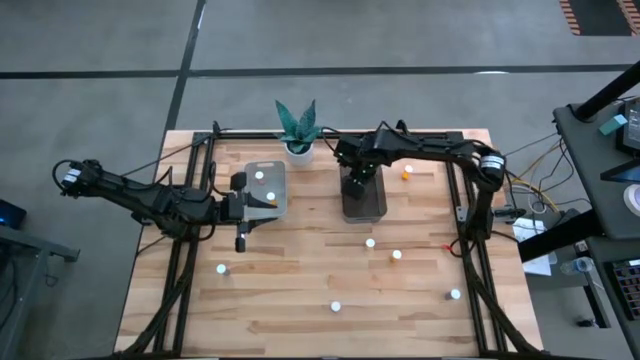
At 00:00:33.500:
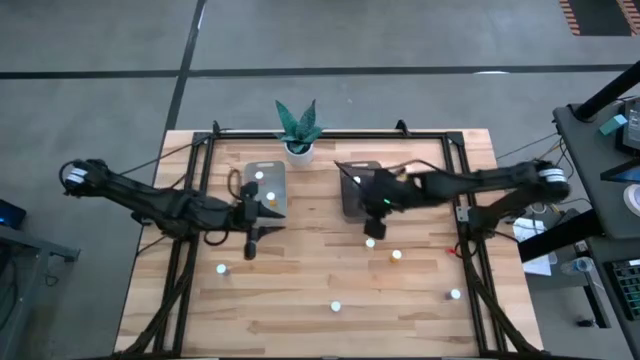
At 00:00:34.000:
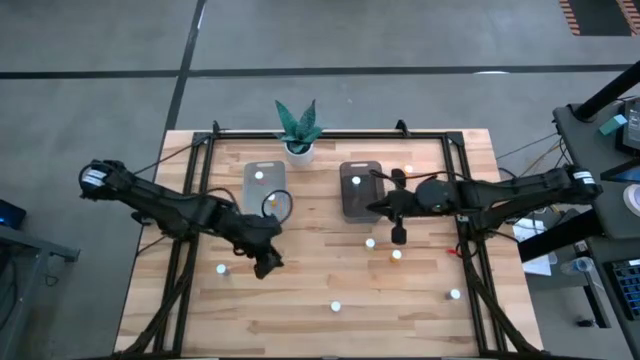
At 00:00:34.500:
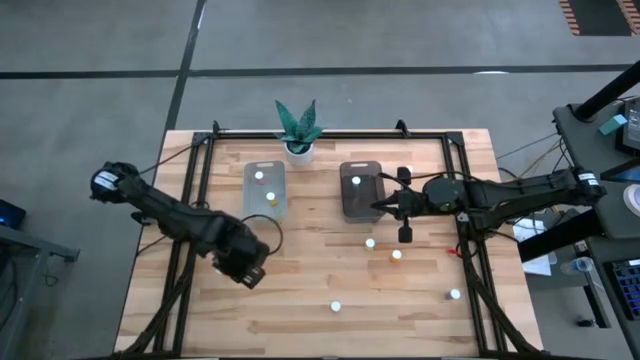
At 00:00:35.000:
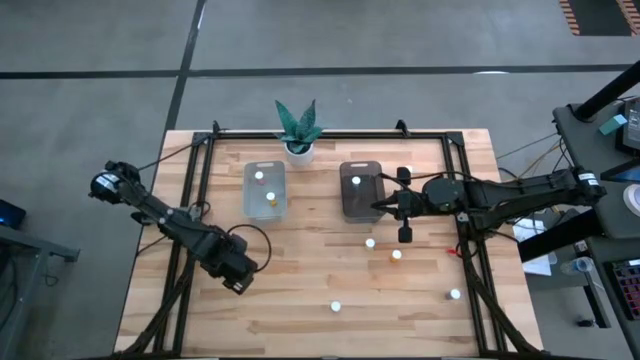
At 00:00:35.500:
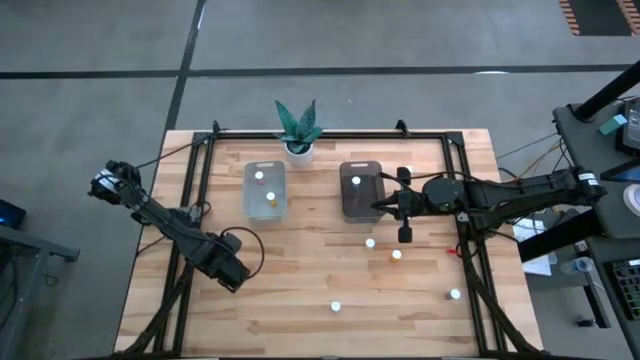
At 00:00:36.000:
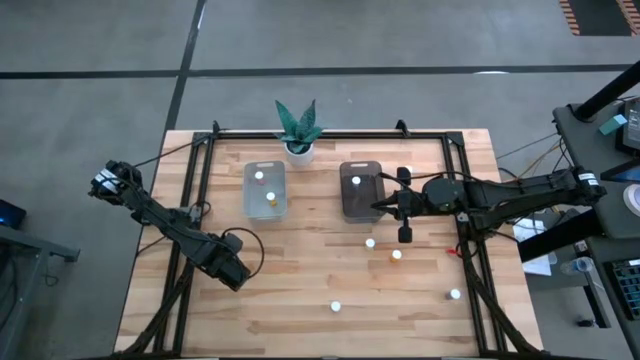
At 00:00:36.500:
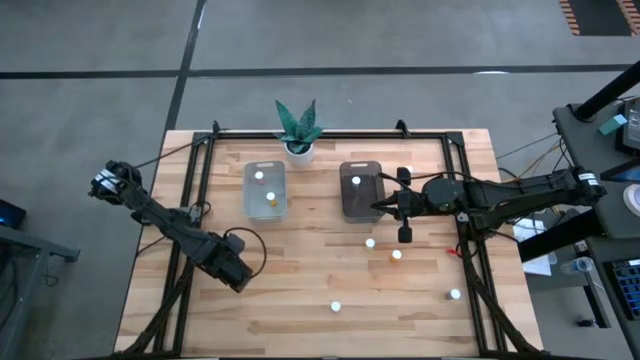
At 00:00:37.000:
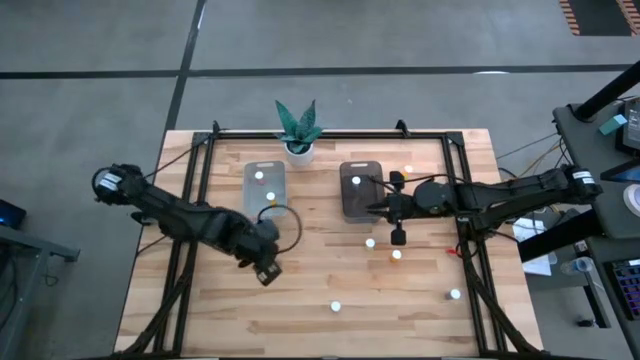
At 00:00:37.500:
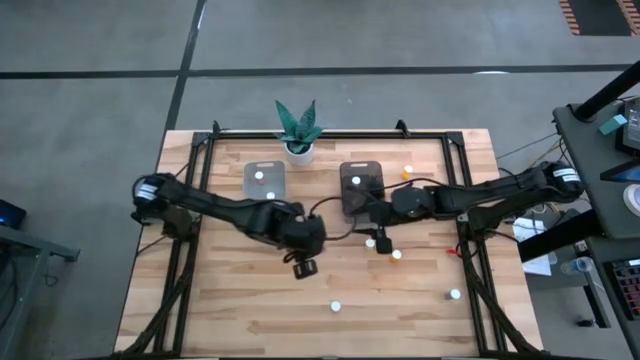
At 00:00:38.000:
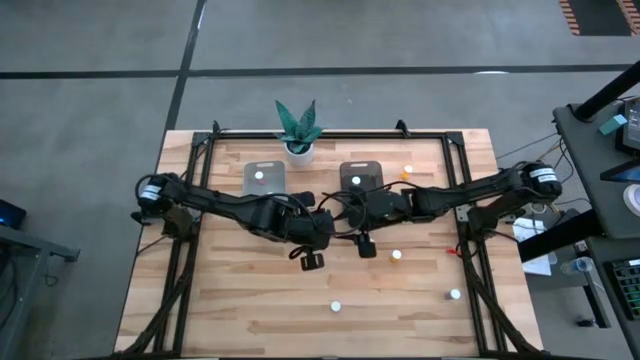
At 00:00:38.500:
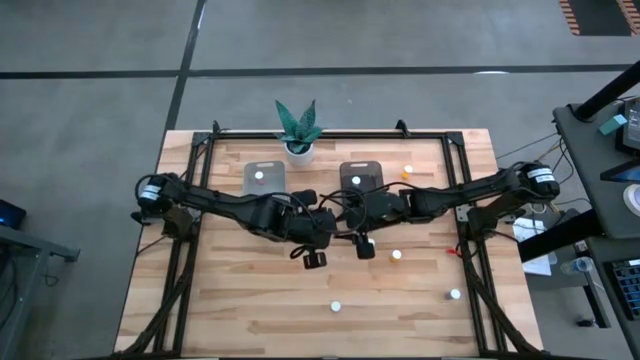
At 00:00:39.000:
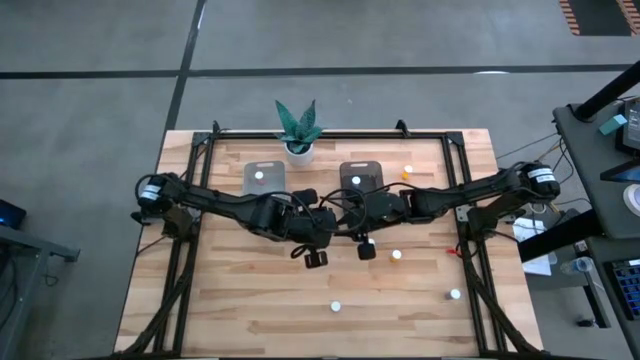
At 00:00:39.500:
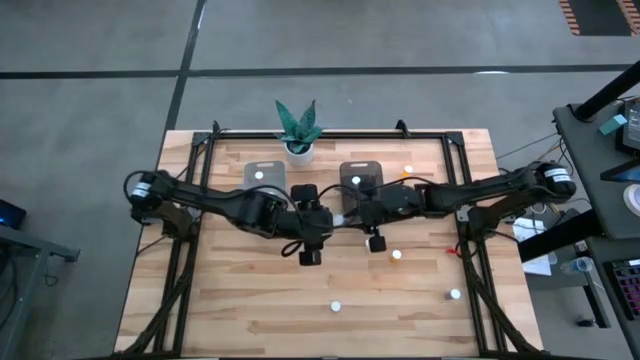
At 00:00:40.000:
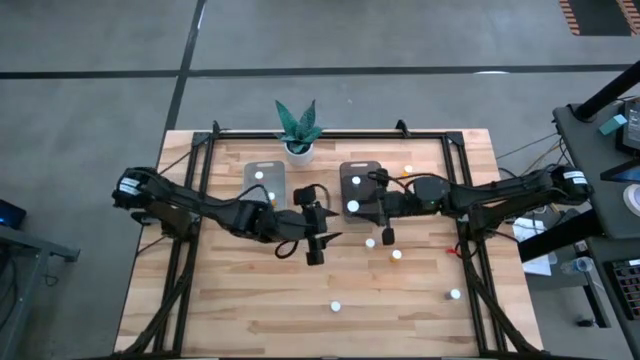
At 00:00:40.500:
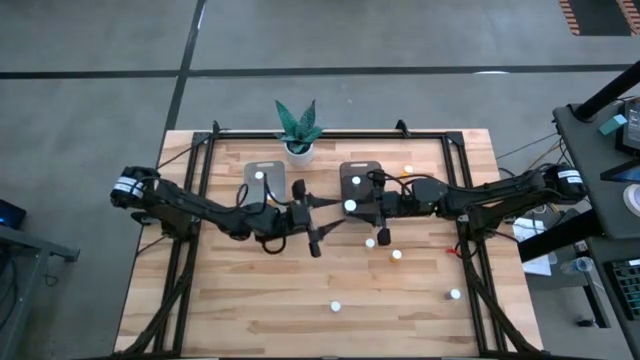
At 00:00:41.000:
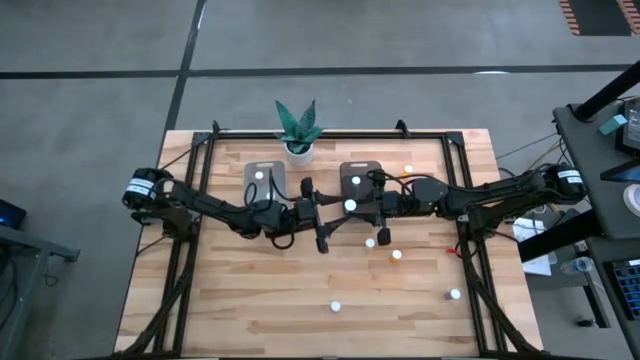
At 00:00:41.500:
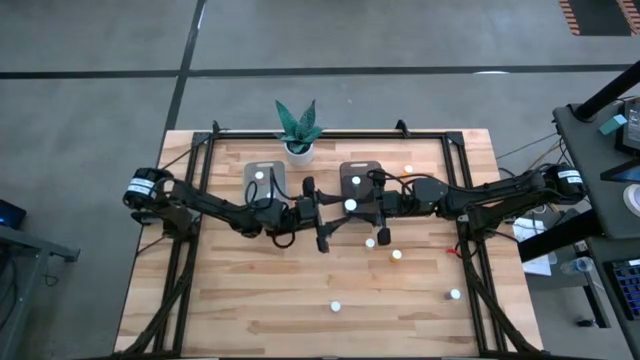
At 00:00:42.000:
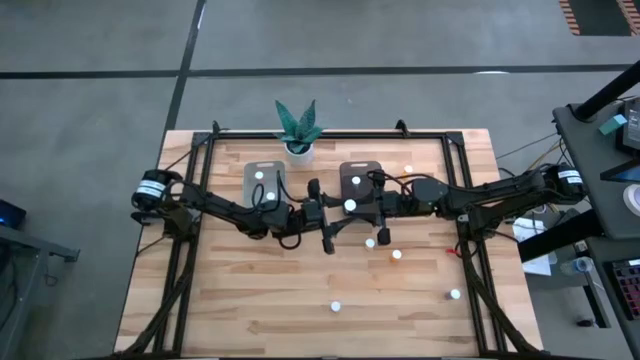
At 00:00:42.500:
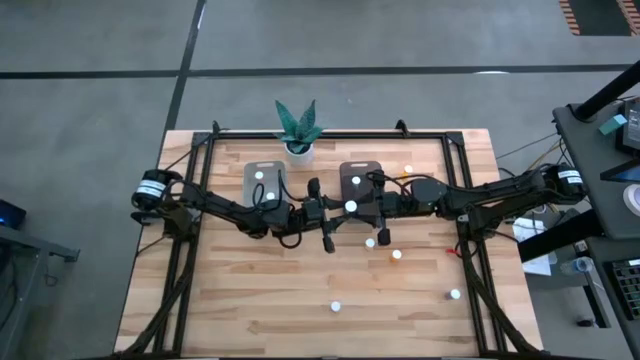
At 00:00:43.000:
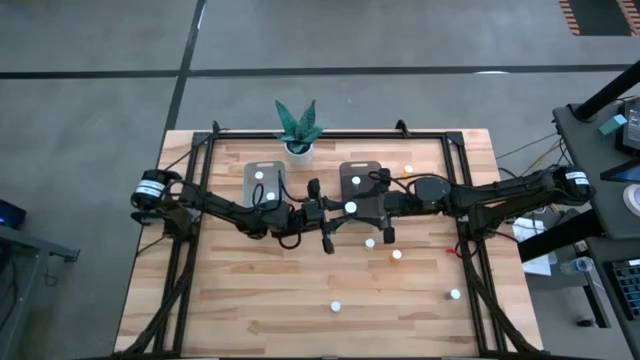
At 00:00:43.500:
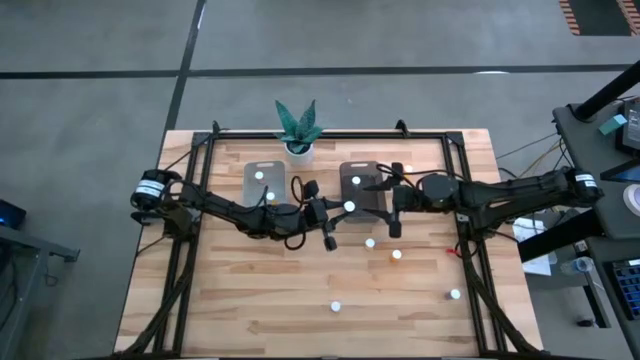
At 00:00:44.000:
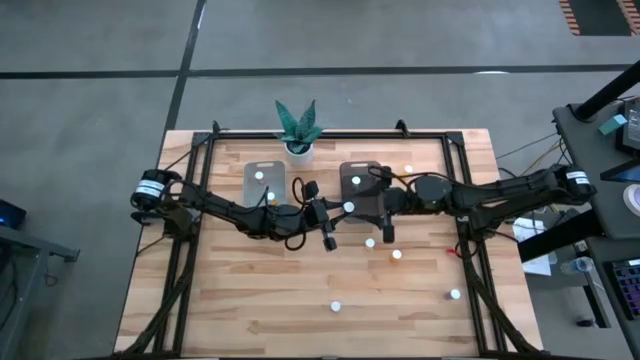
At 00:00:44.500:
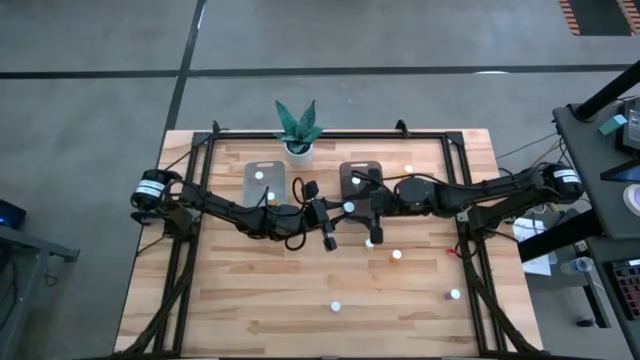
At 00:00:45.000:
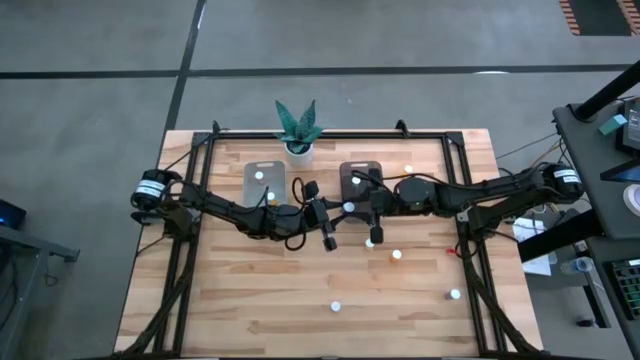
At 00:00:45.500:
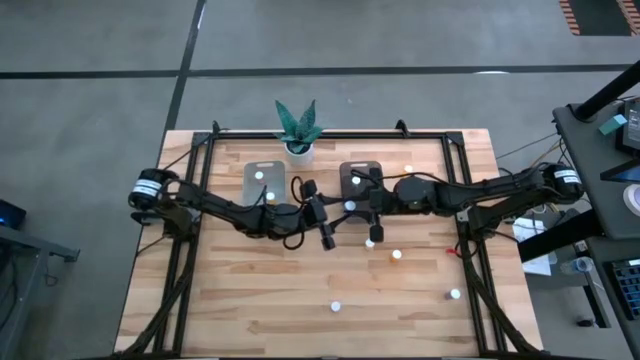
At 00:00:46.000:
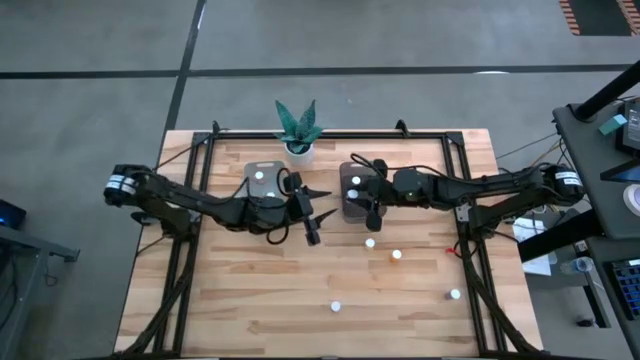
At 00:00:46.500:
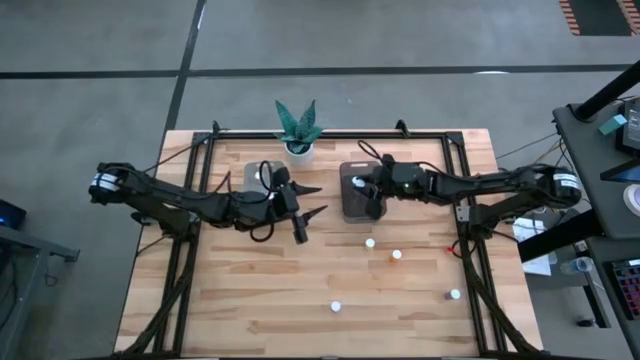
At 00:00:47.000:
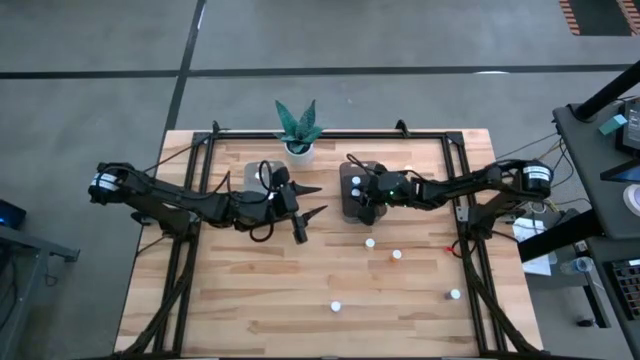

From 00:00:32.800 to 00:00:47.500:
Task: Pick and place medicine bottles into bin by pill shape (circle, oval)
Put the left blue capsule bottle into the black bin

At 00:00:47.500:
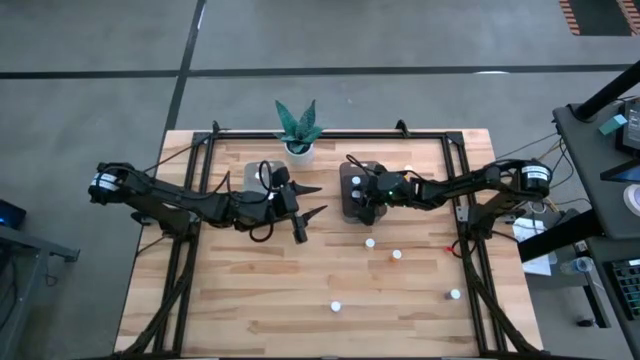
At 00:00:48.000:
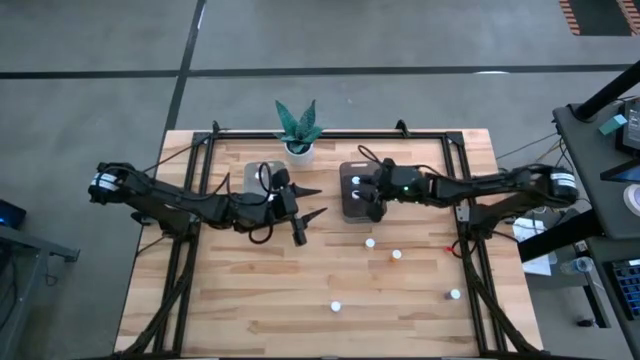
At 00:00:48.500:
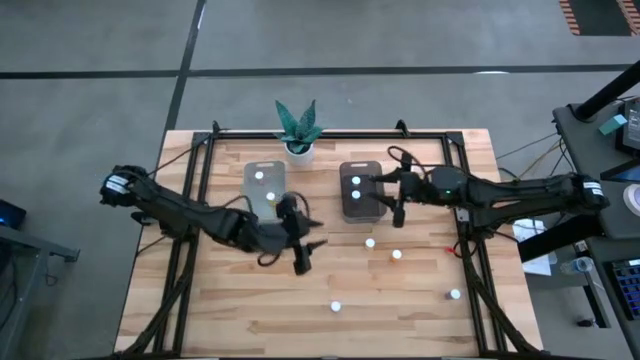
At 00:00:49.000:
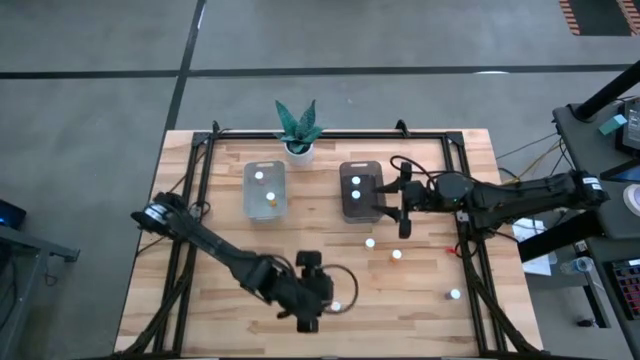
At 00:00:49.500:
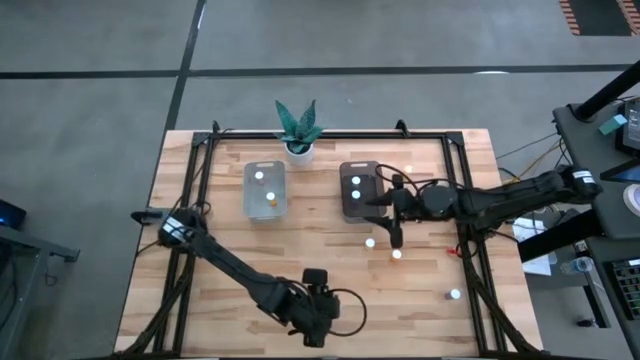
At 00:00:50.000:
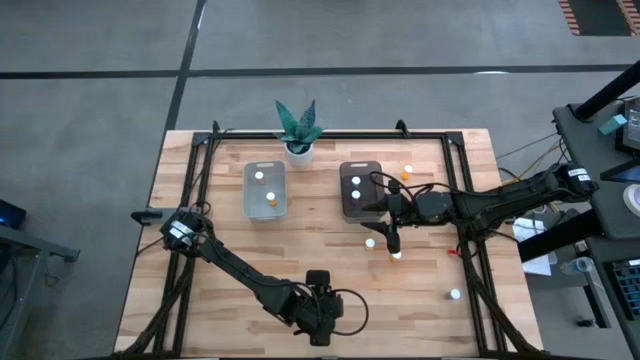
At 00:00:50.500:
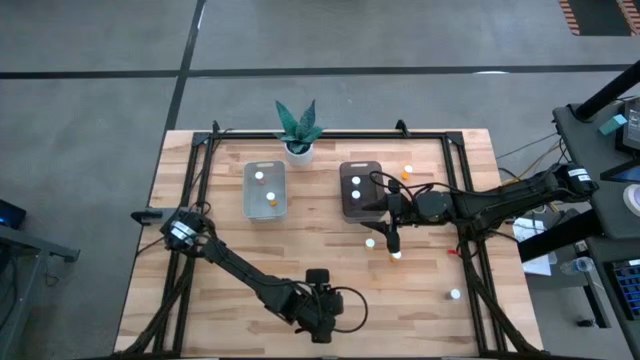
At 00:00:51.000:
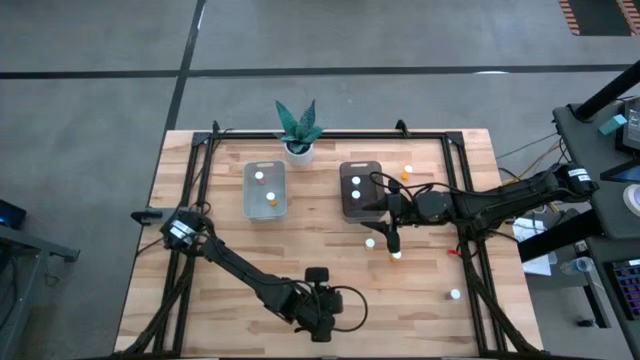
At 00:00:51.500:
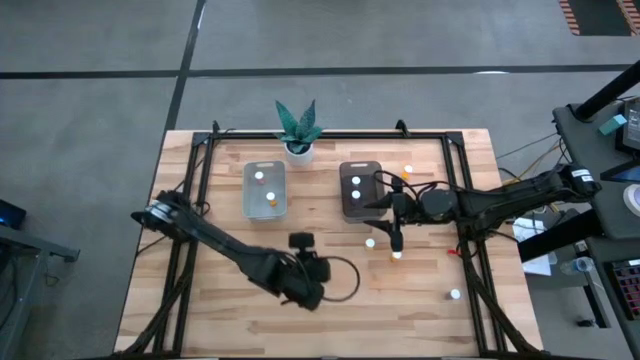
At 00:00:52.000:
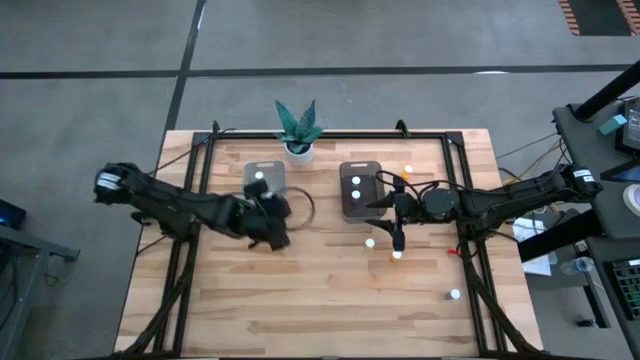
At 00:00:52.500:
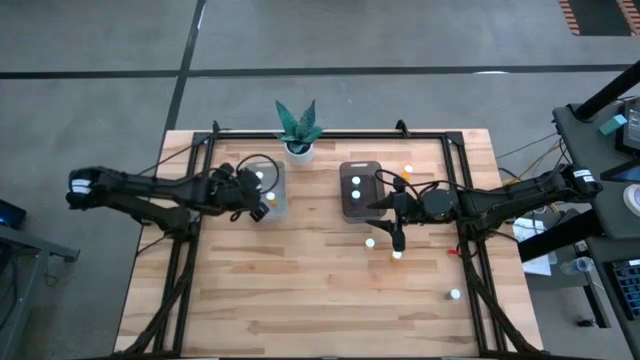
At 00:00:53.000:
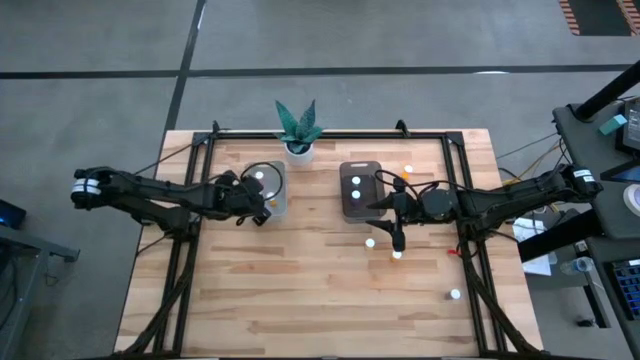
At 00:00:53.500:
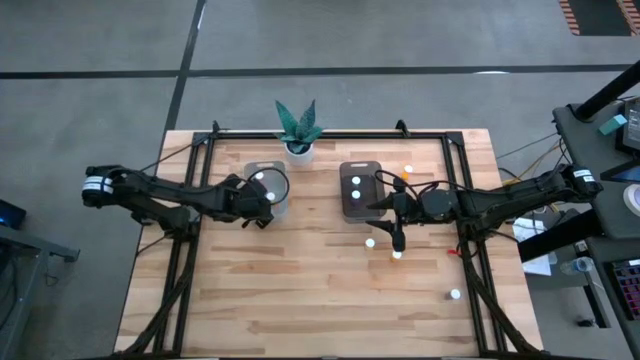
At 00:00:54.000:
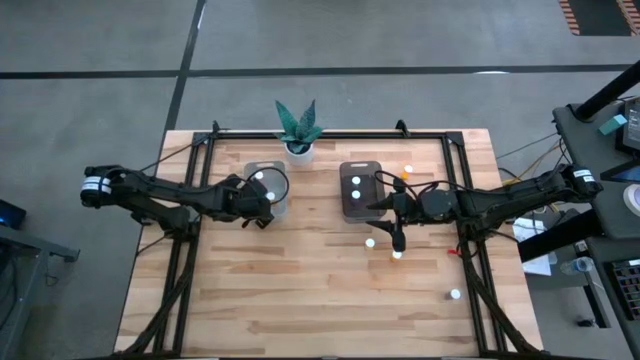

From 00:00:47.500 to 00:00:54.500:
Put the pink tablet bottle into the gray bin

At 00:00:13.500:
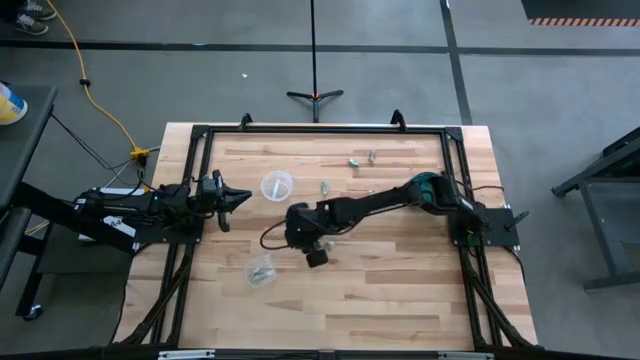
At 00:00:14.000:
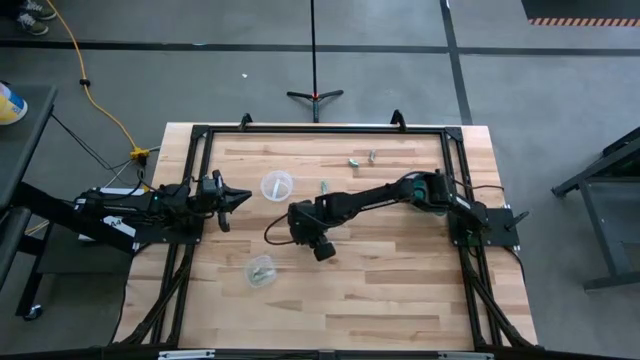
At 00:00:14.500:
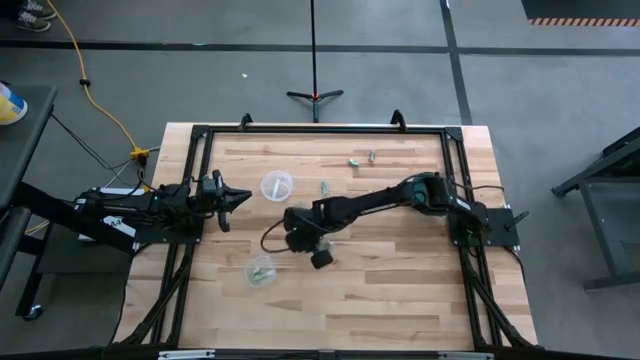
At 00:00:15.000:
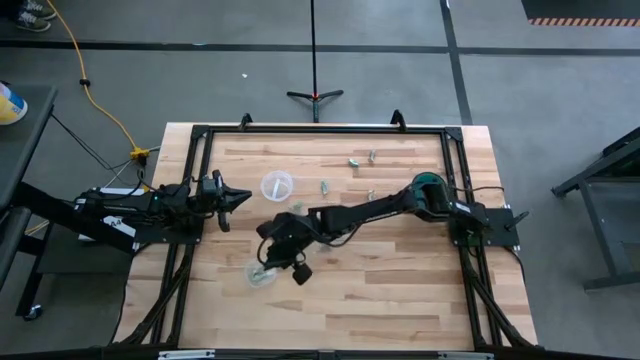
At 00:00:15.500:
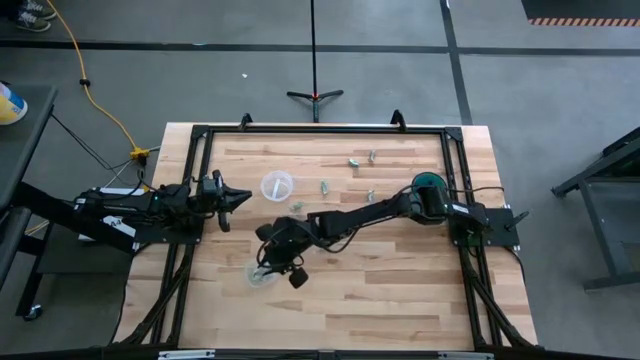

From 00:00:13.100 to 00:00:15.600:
Task: Pick and place items into bin
Put the white stevia packet into the bottom transparent bin
